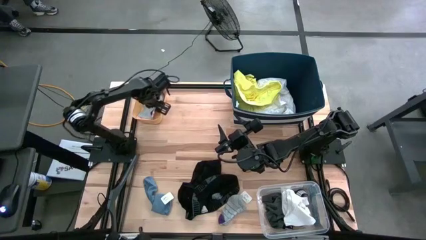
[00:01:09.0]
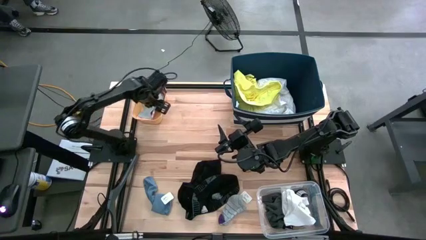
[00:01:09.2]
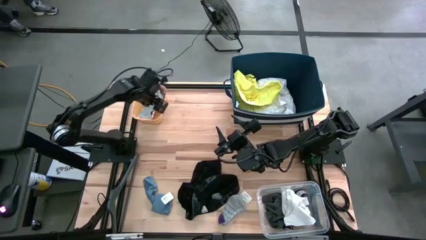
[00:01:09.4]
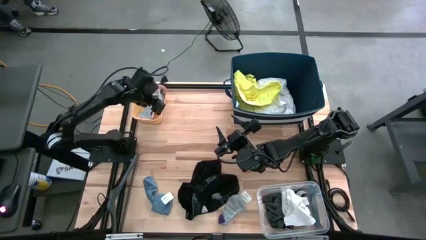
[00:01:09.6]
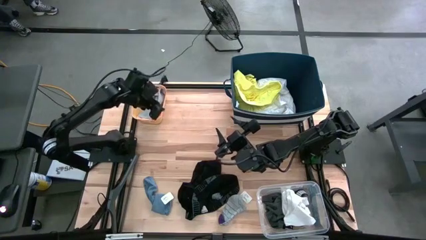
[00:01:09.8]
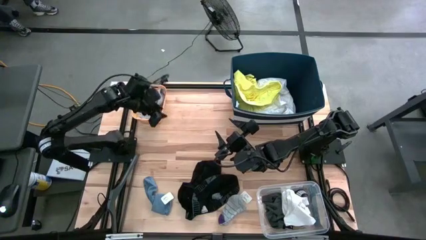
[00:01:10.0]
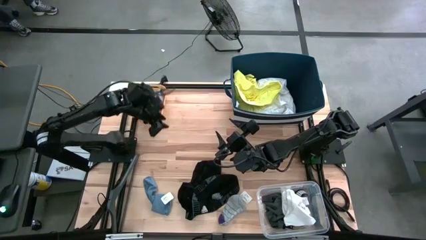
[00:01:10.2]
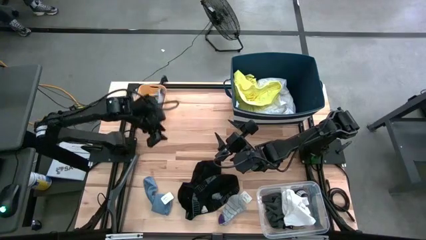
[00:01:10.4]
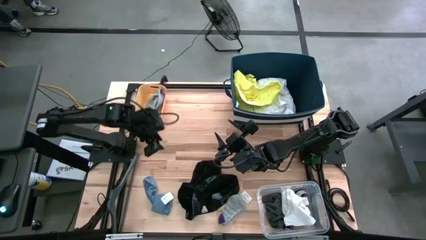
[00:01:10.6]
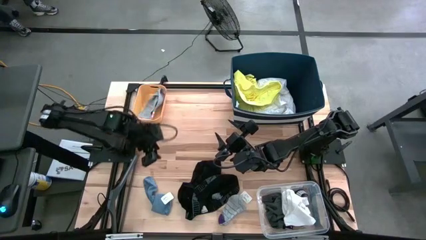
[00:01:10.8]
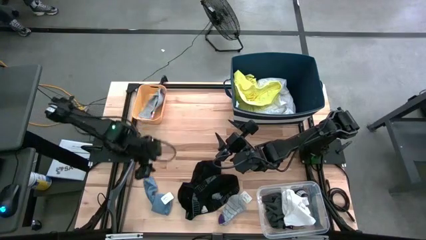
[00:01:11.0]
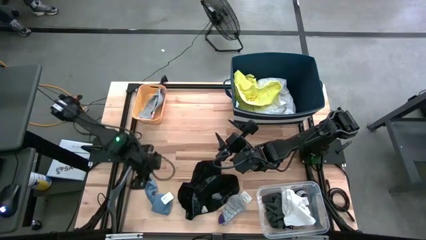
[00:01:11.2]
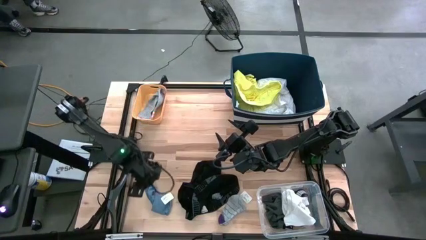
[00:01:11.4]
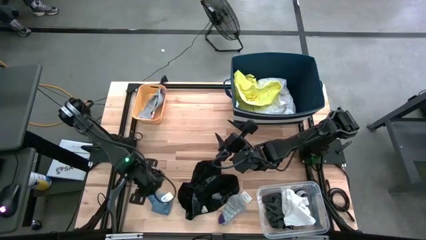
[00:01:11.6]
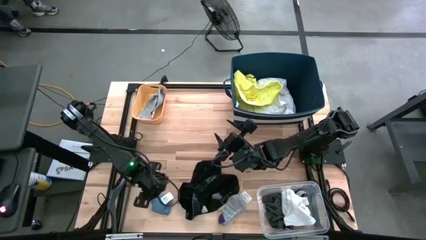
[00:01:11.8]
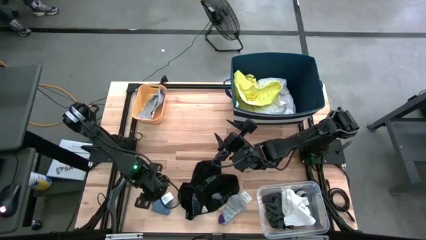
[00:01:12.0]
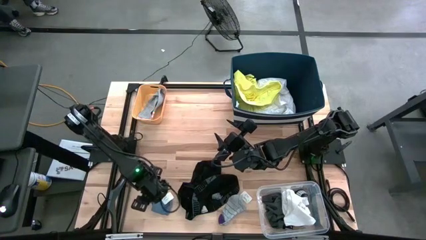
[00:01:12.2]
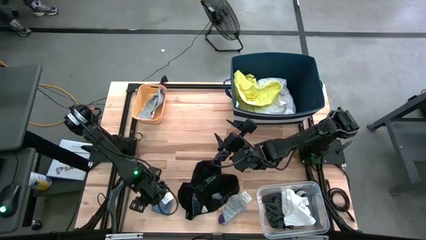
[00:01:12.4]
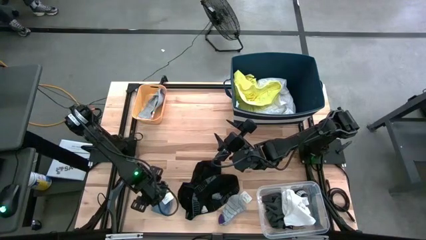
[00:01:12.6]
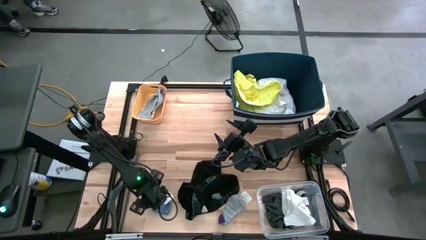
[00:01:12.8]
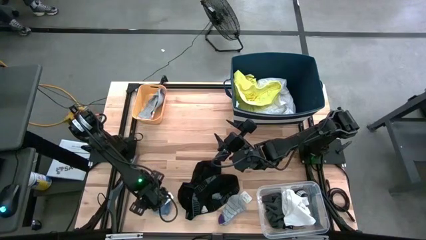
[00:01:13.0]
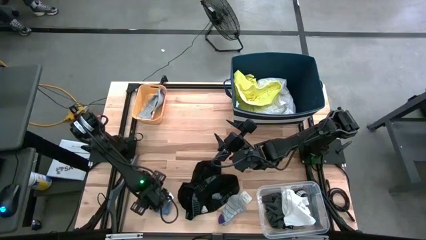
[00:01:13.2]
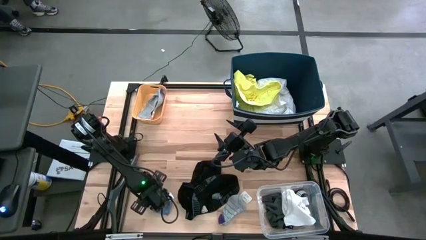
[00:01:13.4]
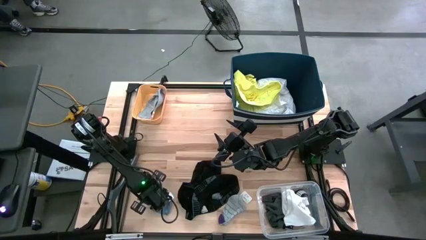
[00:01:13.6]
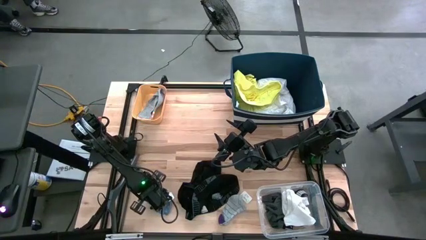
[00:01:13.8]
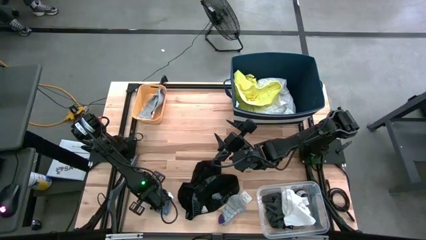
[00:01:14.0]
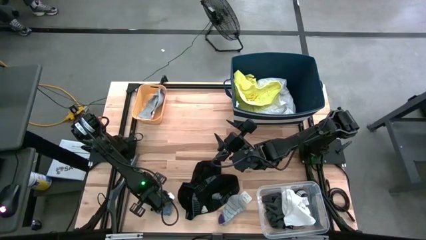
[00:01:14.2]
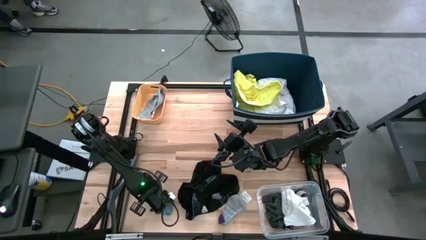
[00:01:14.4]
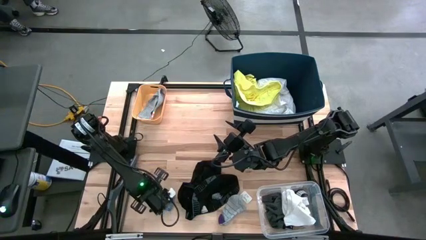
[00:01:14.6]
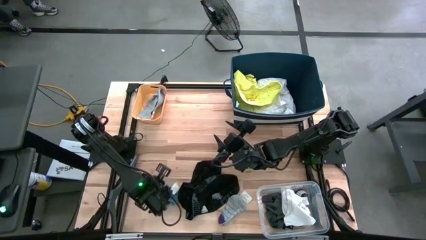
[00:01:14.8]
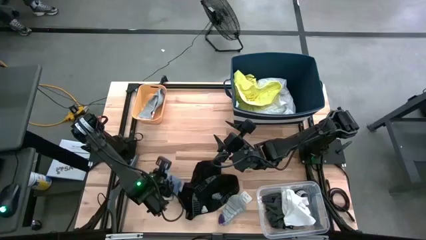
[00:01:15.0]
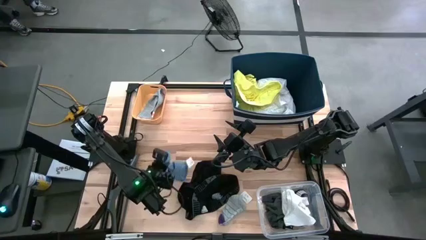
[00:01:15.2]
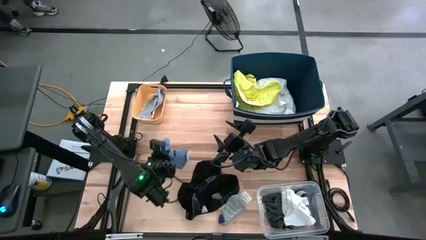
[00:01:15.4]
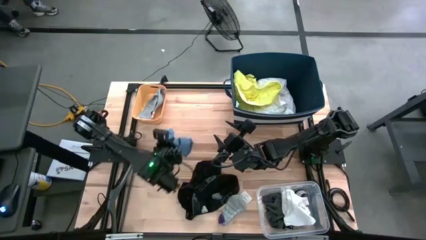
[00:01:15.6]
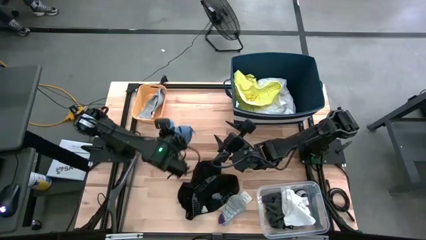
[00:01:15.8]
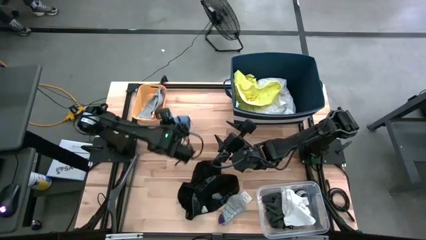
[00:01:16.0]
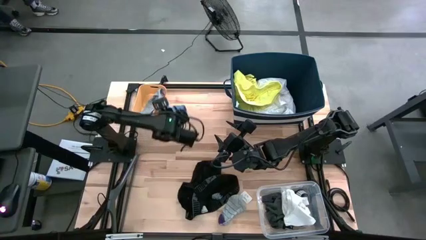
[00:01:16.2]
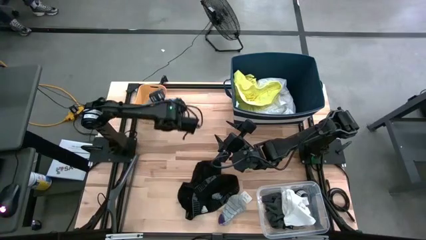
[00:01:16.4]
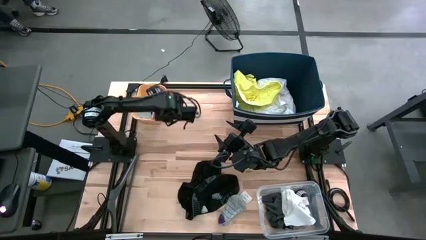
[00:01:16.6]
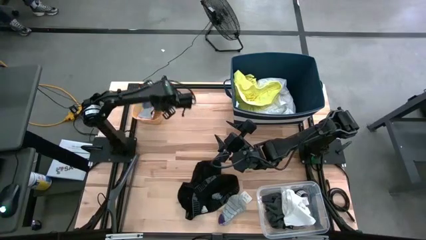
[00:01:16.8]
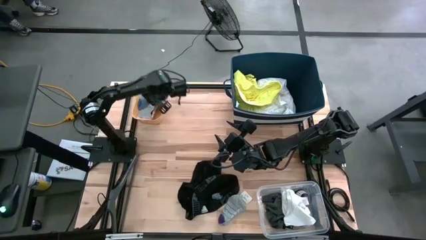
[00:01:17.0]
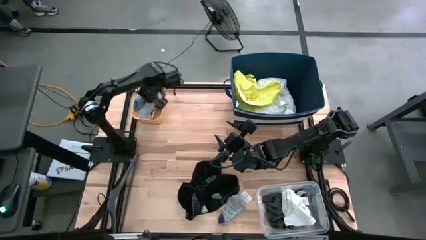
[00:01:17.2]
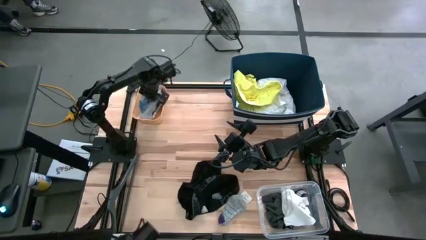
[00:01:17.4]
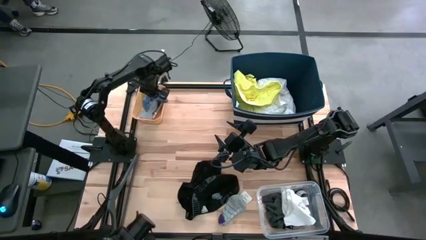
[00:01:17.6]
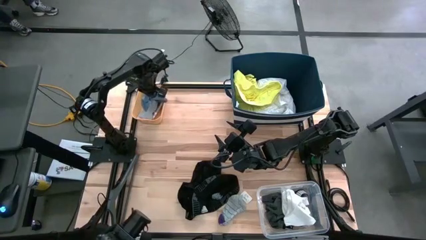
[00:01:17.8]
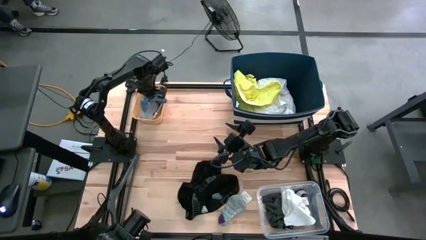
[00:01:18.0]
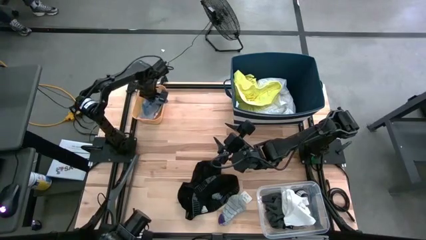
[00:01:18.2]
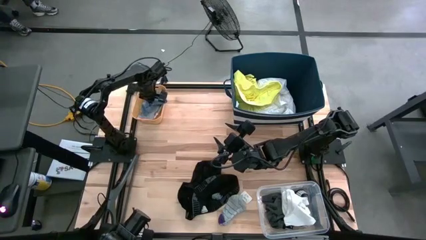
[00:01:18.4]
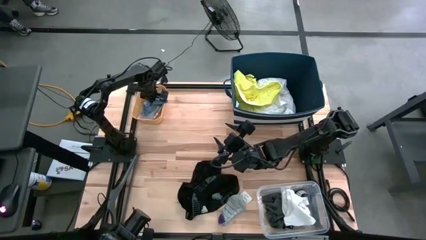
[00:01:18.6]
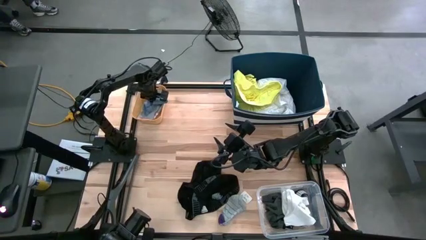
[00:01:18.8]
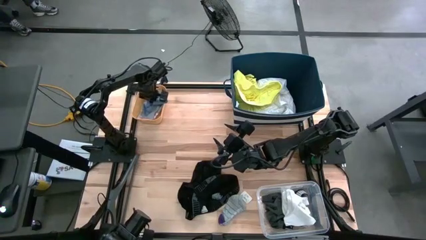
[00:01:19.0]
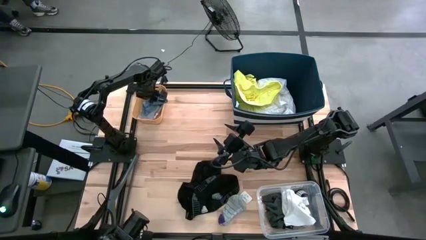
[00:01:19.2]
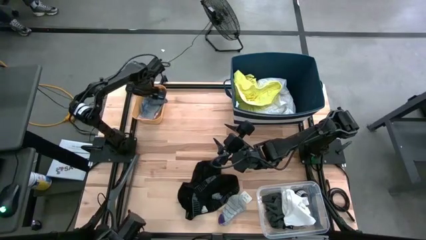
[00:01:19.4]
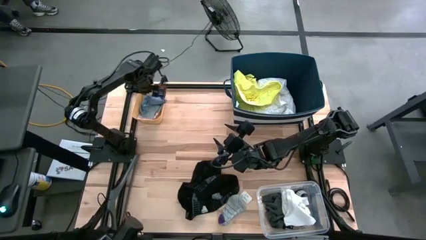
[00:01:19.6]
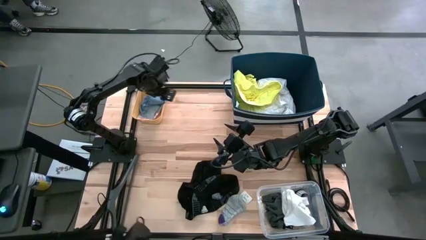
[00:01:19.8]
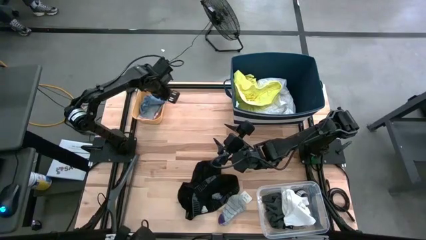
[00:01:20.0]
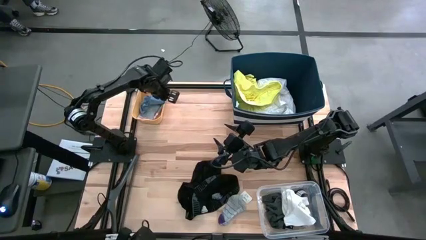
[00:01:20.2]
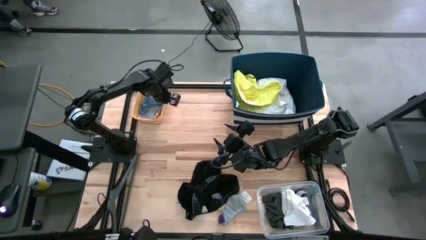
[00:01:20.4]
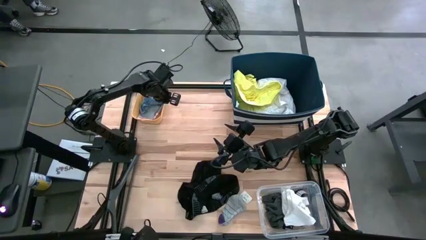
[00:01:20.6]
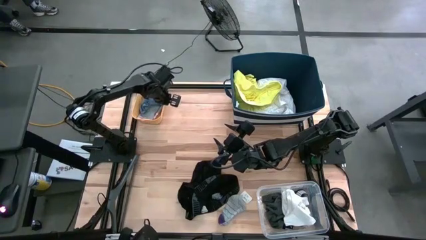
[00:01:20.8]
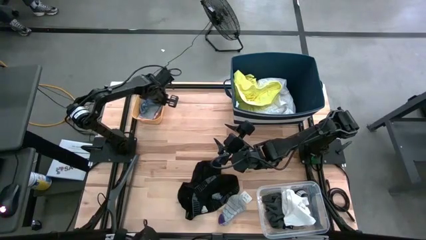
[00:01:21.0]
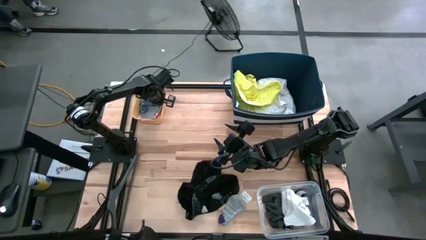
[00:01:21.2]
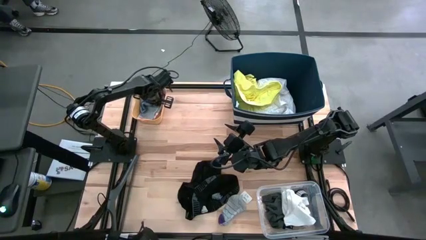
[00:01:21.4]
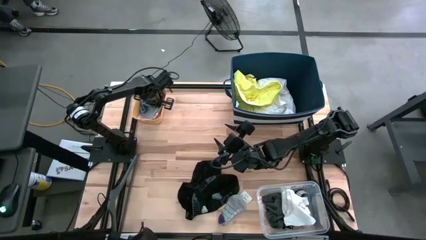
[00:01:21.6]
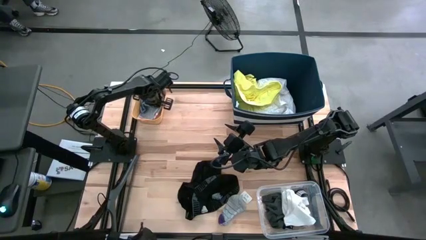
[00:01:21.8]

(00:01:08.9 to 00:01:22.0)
Task: Pick & Place Cloths
Put the blue sock into the yellow bin

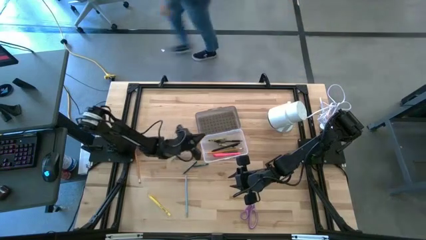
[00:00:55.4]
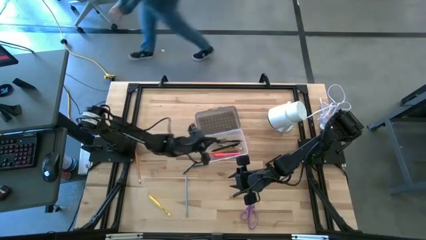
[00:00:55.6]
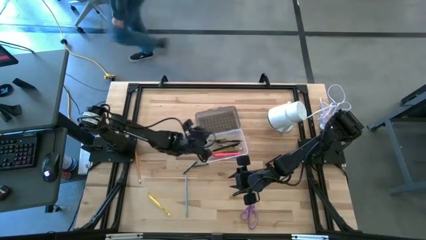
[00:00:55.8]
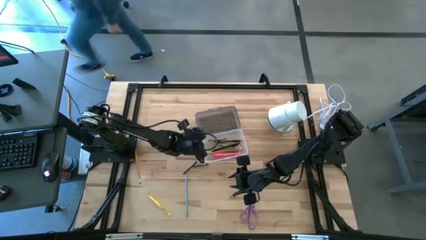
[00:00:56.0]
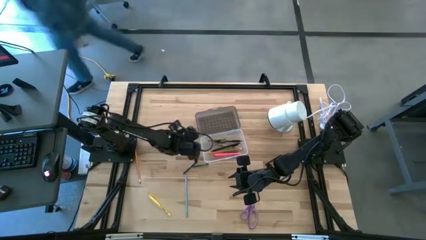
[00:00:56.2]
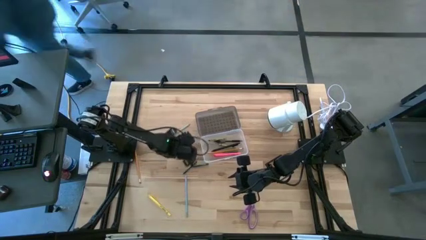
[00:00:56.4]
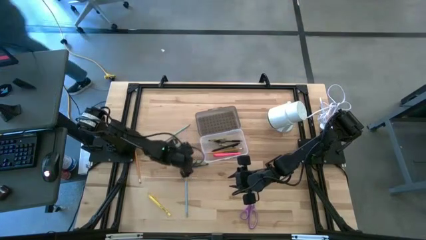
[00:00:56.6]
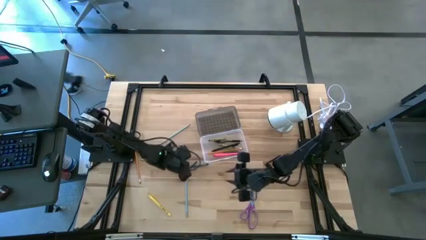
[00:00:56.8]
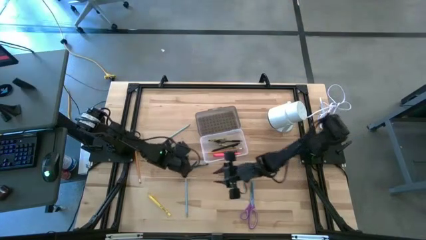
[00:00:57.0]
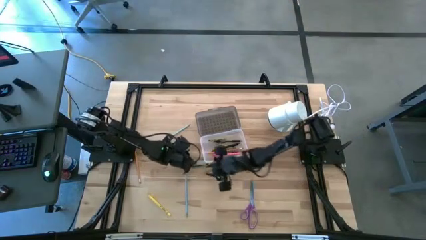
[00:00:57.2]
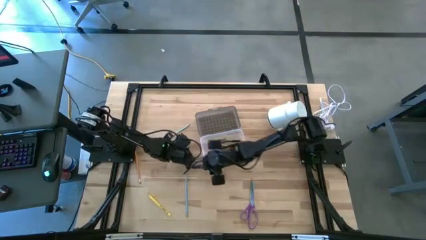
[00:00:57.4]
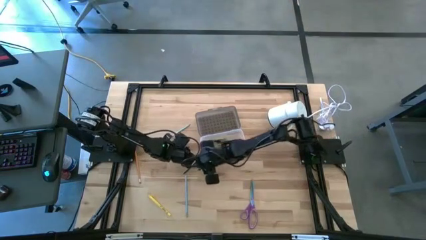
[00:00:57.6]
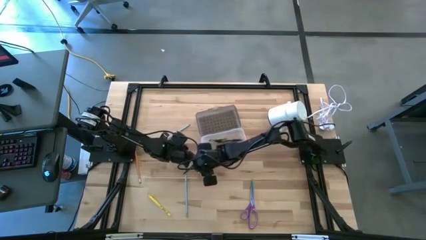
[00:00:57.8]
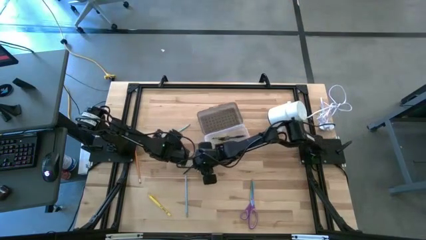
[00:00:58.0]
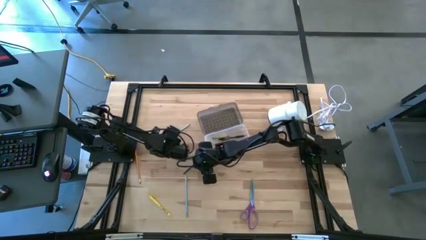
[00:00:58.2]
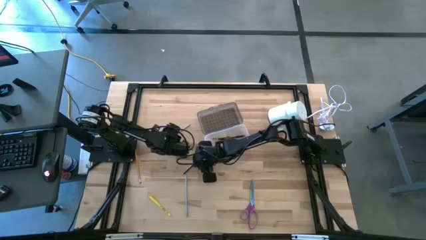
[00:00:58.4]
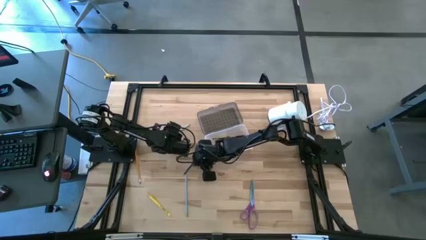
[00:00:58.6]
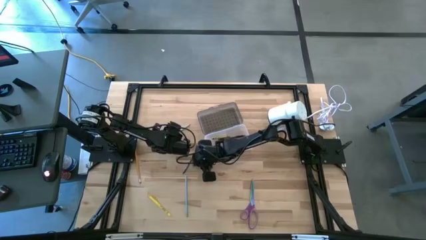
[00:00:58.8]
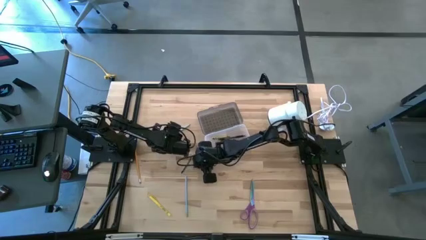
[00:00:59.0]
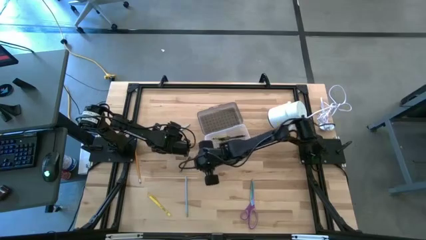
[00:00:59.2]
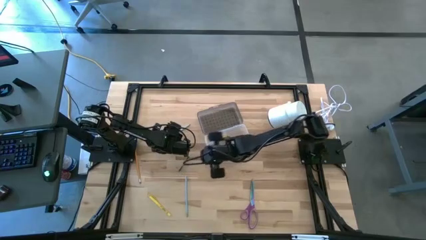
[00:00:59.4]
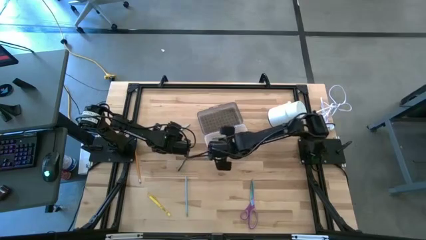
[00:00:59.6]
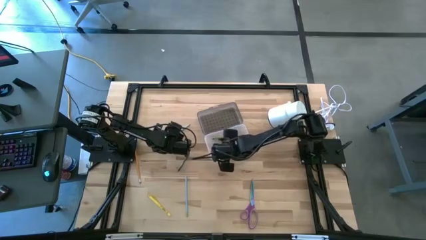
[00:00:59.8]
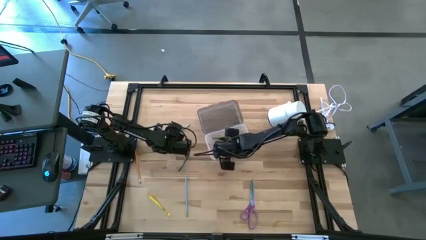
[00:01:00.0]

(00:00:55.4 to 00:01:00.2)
Task: Pick & place school supplies into a supply box
Put the left green crayon into the gray supply box
